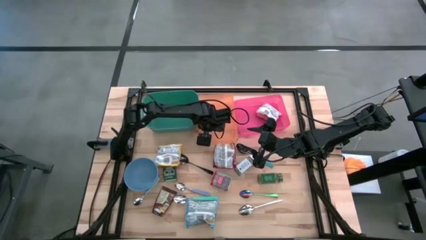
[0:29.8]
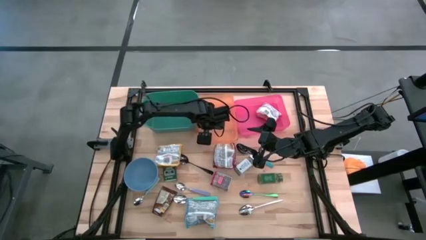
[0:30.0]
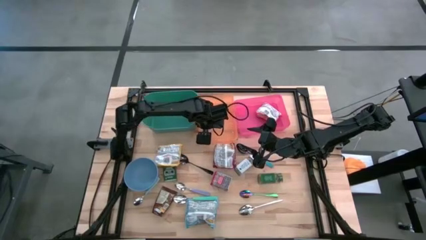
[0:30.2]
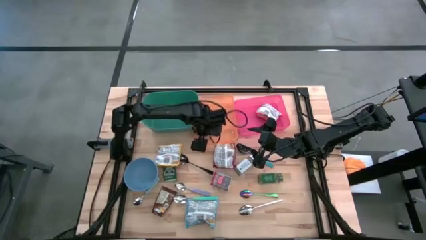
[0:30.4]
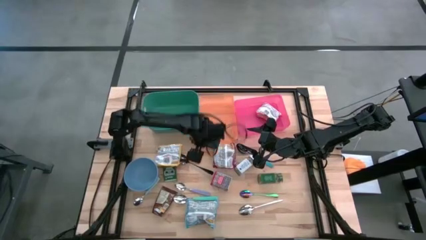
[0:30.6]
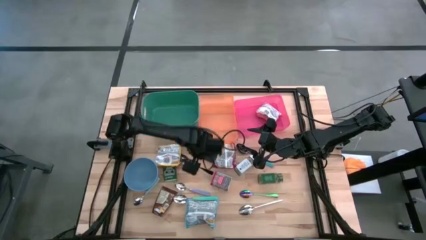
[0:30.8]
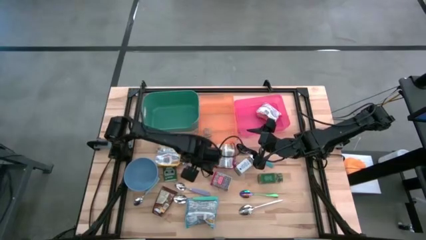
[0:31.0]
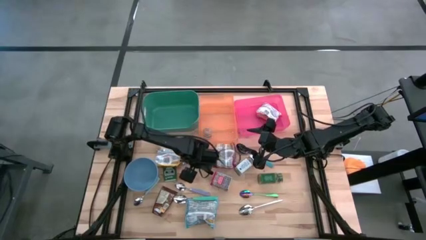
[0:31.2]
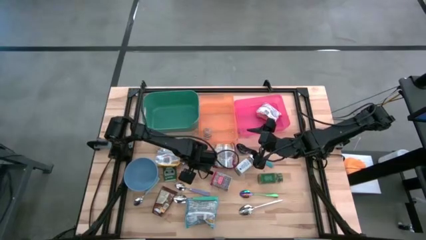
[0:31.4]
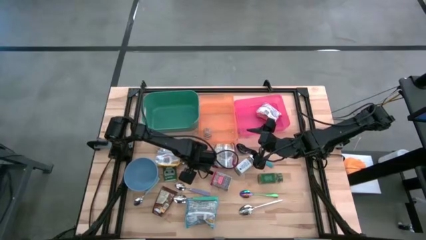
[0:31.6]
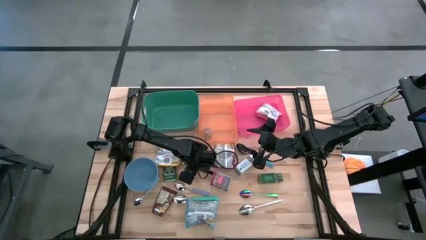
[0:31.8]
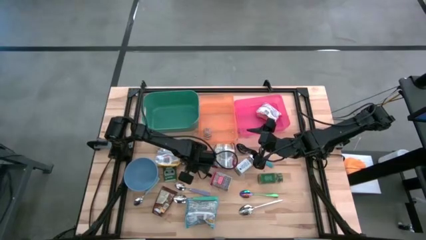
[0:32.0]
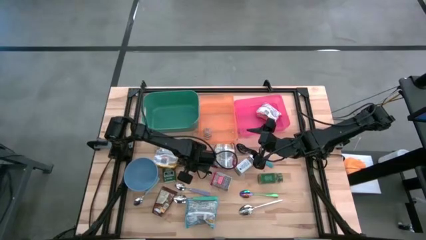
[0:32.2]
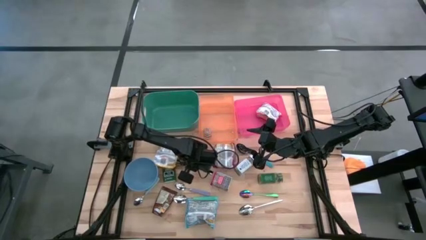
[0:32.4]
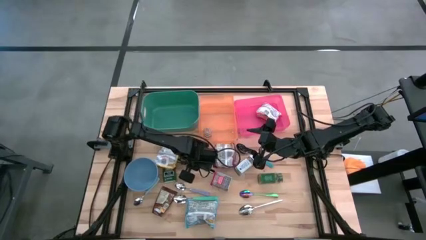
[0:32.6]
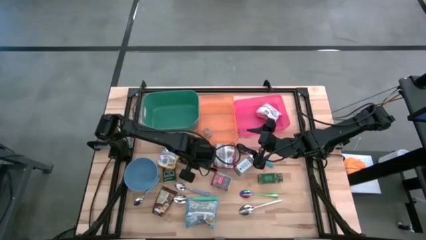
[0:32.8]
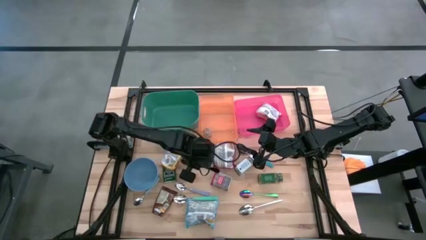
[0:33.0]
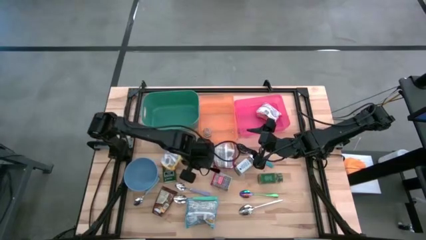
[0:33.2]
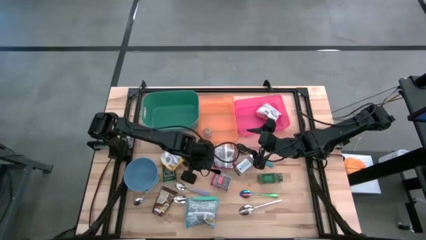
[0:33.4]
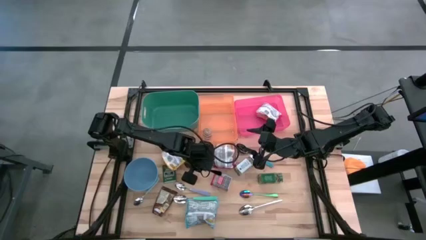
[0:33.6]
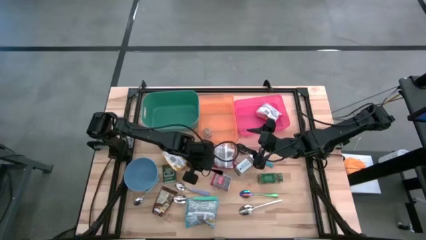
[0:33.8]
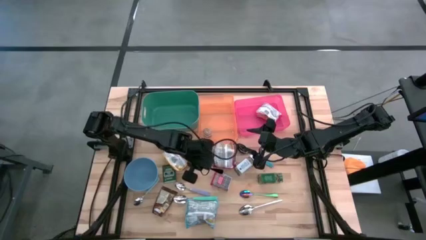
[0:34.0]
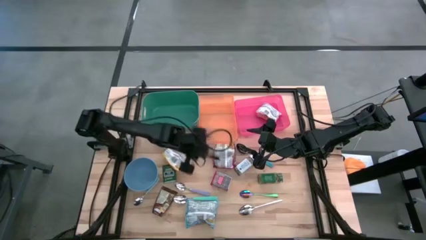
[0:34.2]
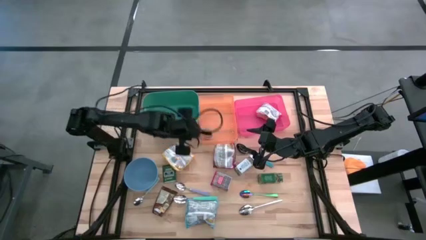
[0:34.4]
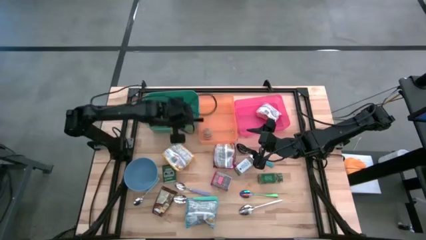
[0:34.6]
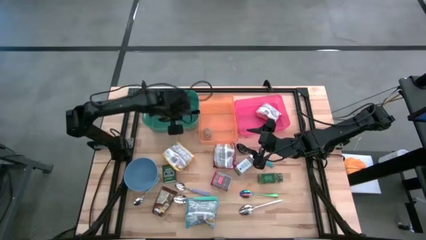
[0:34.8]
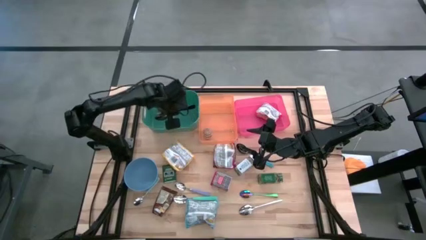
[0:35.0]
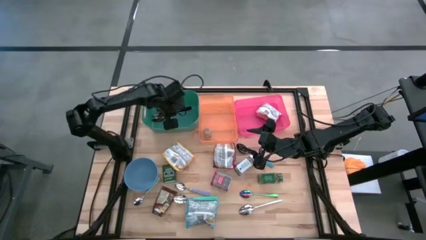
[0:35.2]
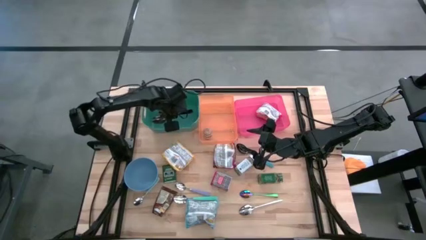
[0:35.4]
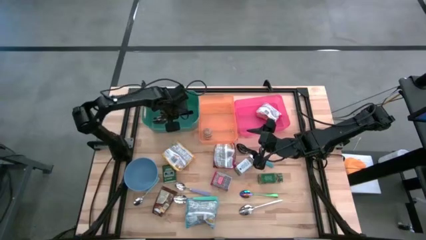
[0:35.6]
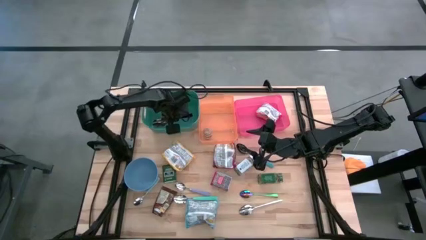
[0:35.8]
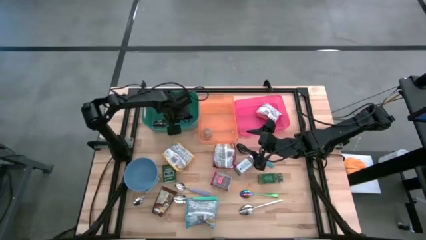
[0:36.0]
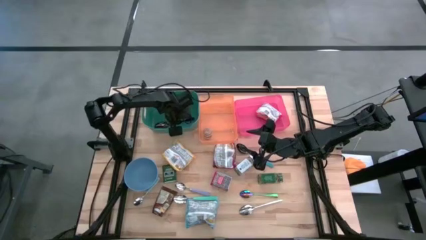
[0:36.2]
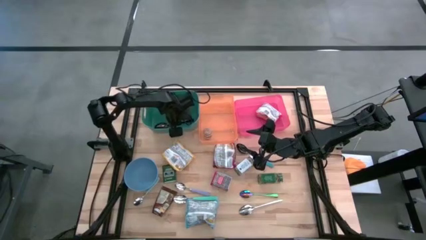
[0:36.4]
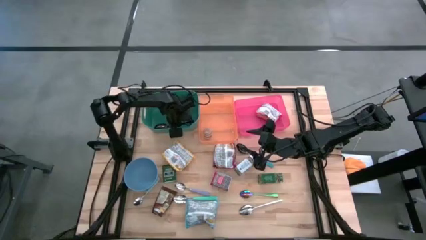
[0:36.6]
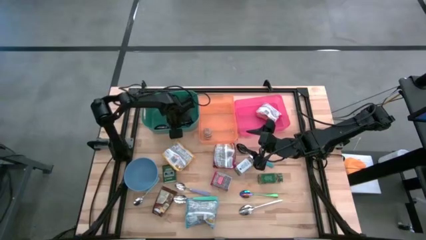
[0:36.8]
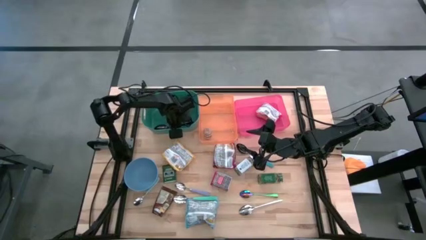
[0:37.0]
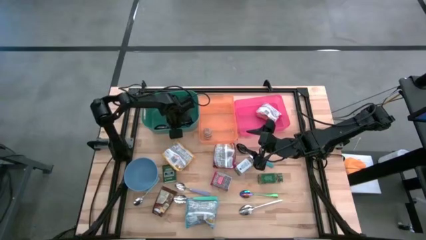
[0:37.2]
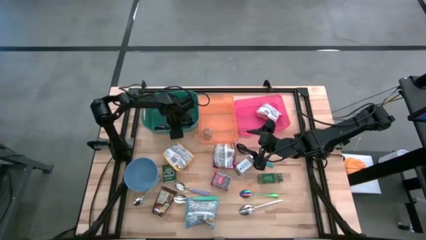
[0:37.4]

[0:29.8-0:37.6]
Put the black spoon into the green bin

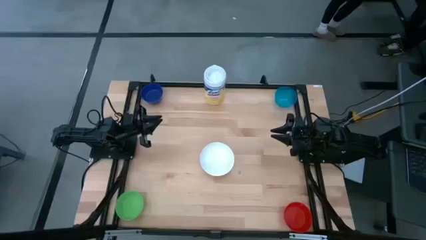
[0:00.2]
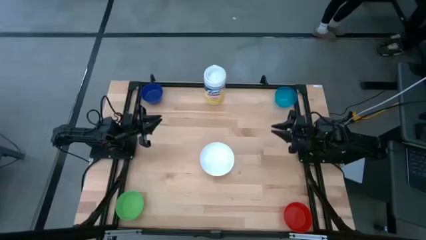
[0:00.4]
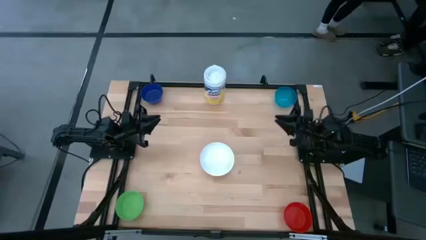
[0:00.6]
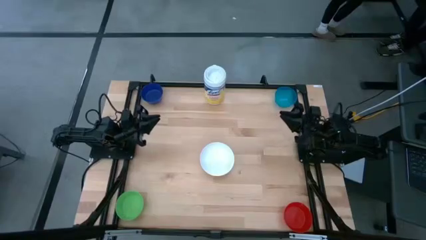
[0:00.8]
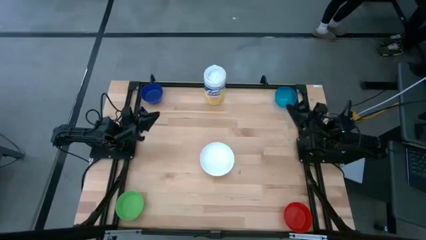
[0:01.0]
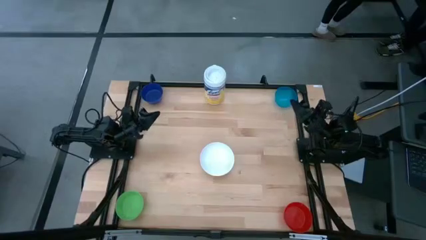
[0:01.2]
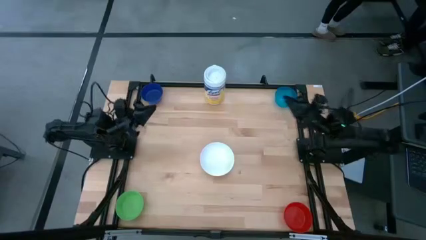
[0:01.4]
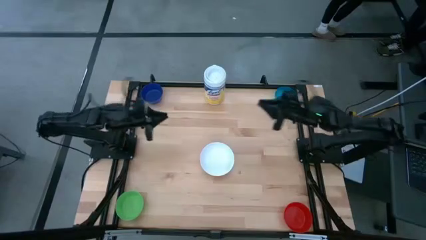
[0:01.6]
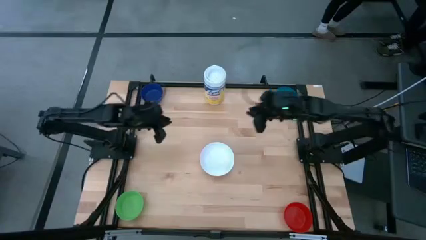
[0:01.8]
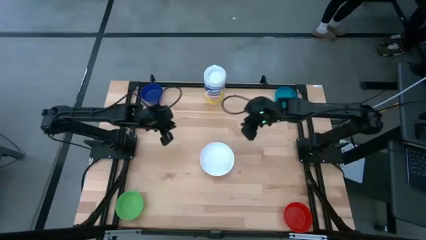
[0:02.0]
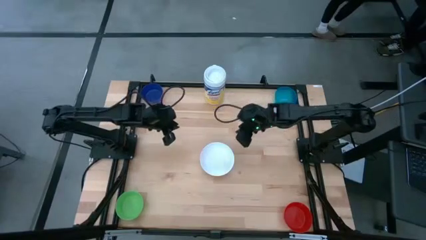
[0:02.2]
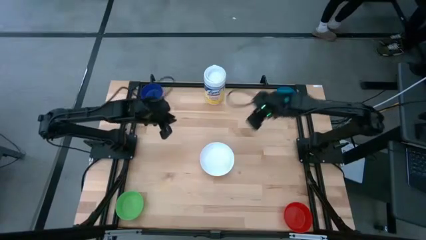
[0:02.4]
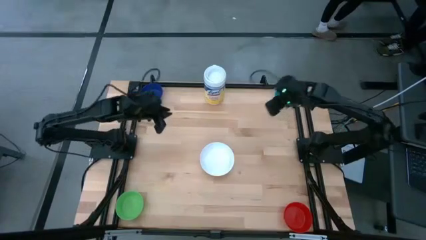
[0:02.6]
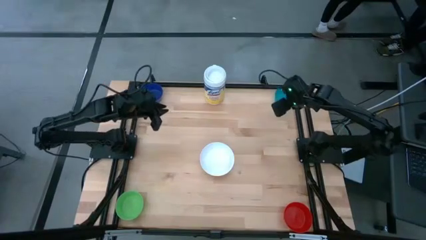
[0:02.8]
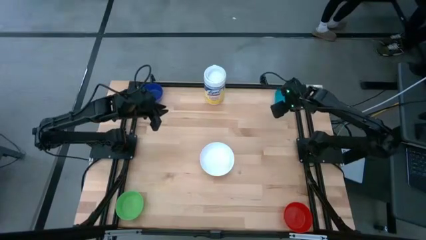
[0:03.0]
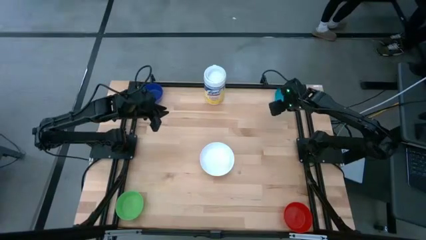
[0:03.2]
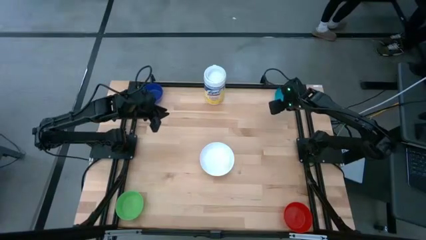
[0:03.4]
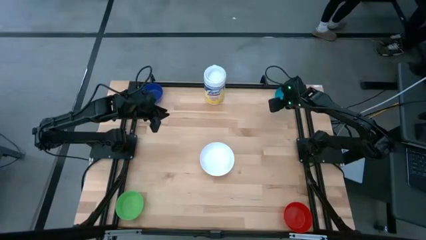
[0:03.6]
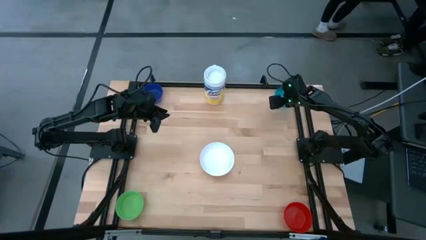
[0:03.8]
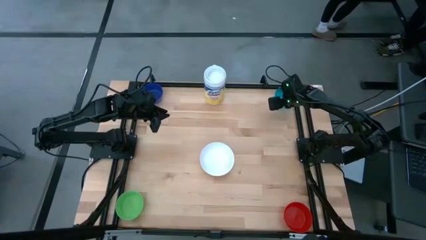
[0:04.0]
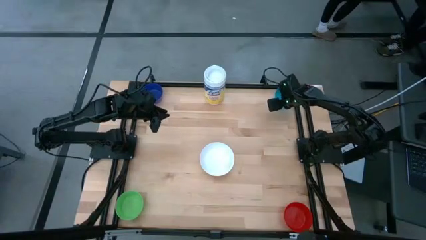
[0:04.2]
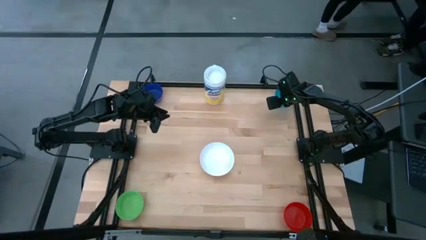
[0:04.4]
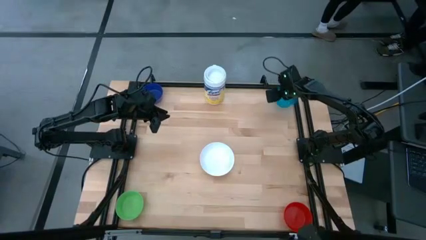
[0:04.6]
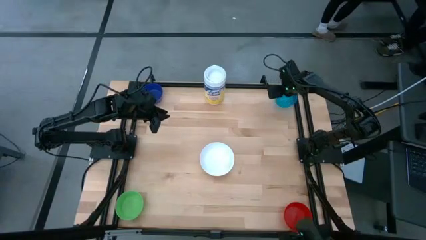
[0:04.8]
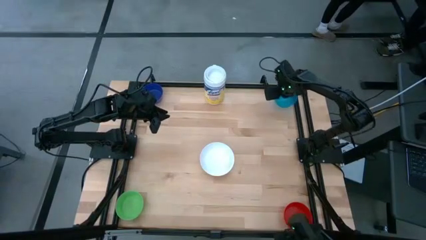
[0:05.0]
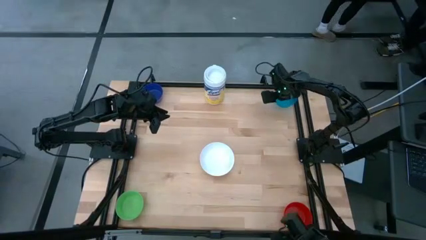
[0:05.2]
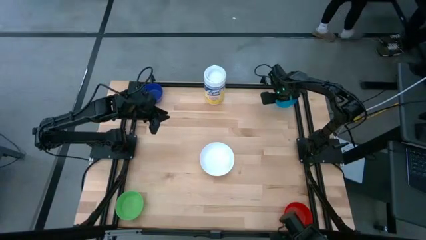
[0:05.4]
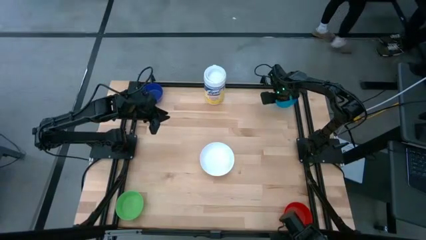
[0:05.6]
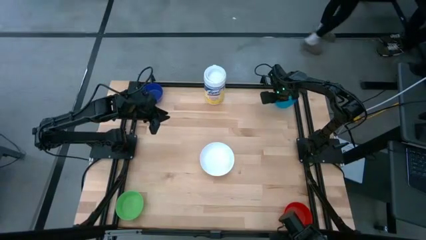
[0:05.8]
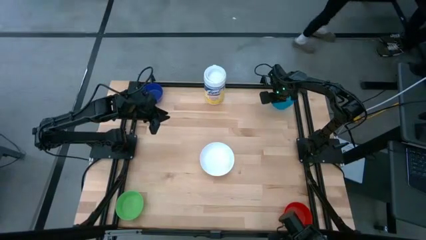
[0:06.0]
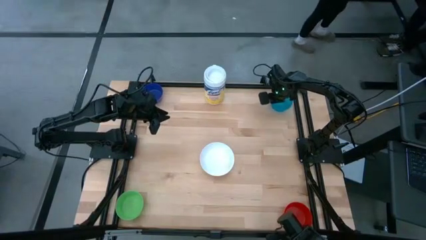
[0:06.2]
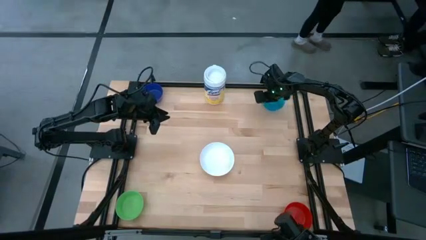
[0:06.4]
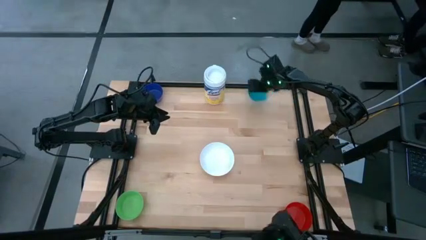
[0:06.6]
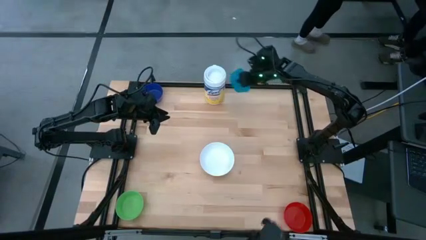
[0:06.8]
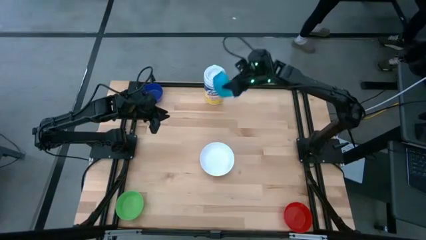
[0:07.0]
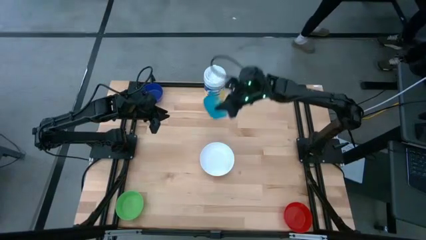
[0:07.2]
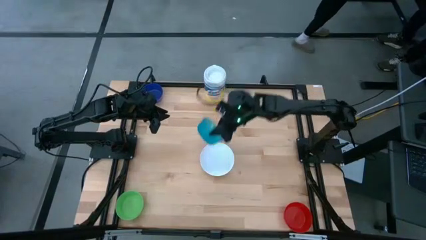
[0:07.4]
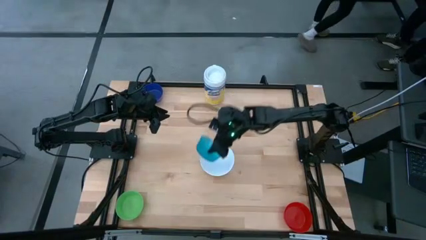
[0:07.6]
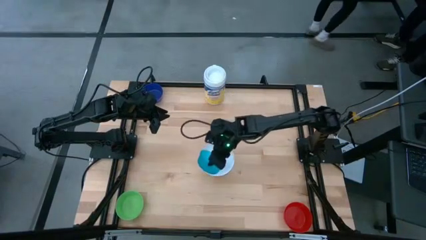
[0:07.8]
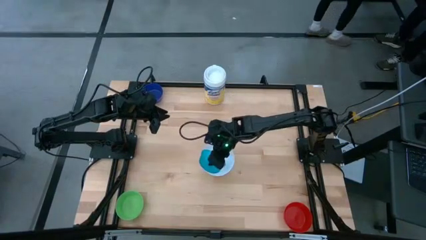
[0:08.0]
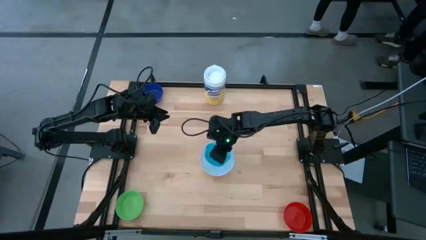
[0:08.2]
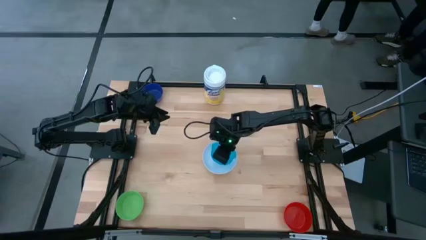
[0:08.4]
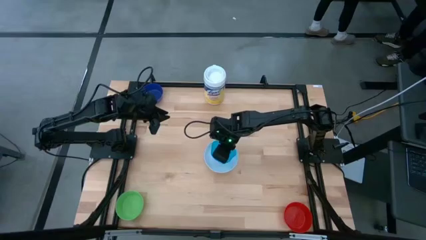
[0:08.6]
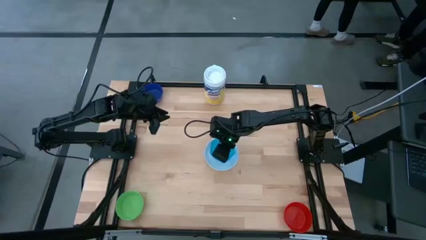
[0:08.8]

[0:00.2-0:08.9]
Stack the blue bowl on top of the white bowl
